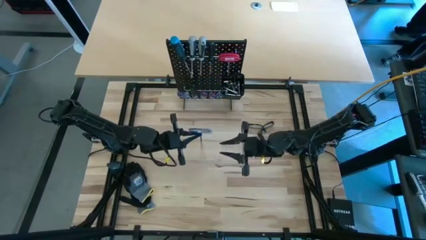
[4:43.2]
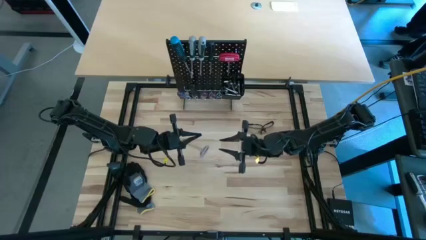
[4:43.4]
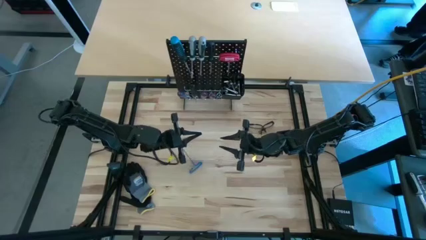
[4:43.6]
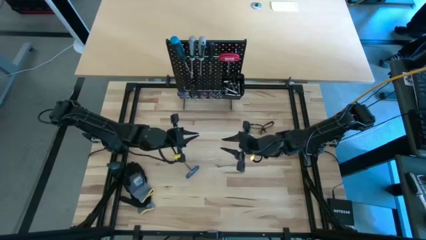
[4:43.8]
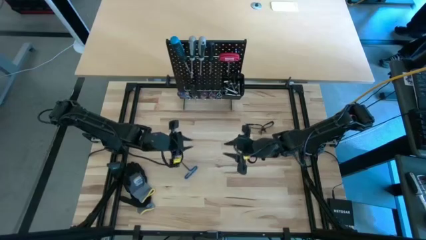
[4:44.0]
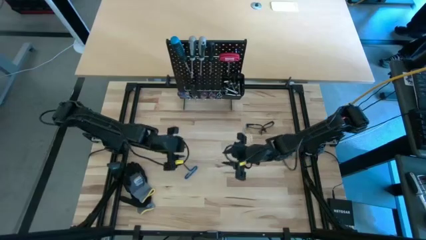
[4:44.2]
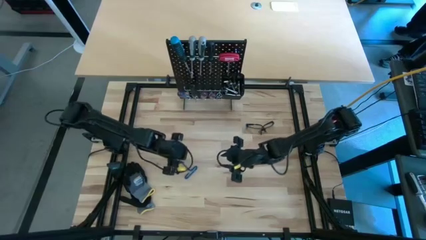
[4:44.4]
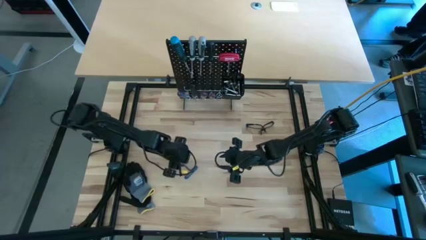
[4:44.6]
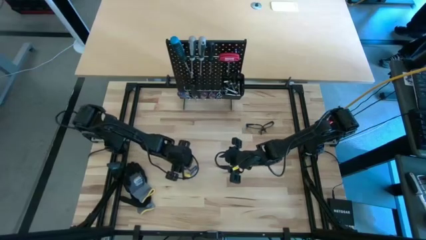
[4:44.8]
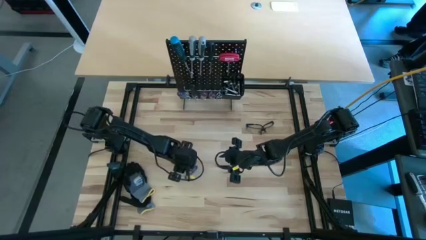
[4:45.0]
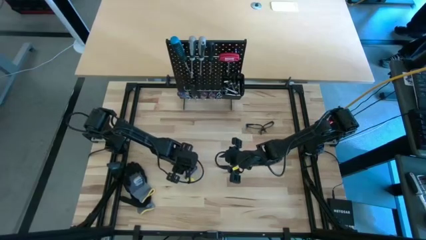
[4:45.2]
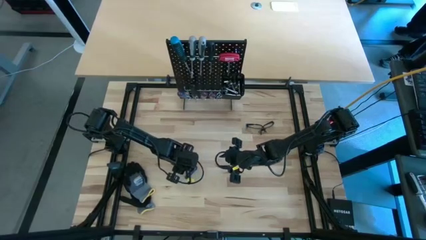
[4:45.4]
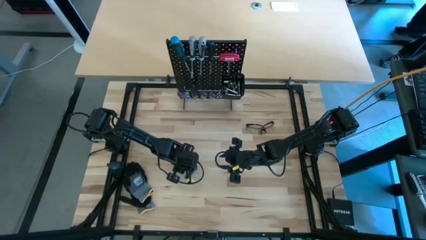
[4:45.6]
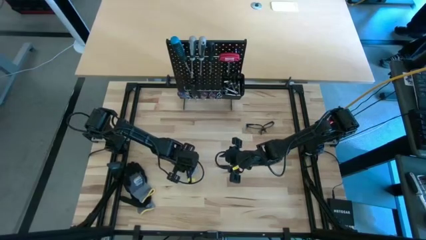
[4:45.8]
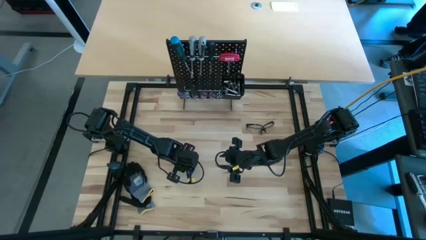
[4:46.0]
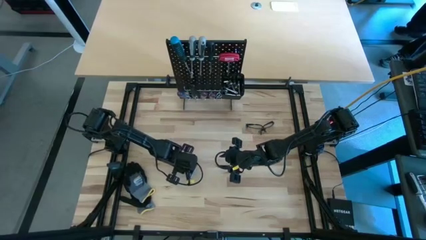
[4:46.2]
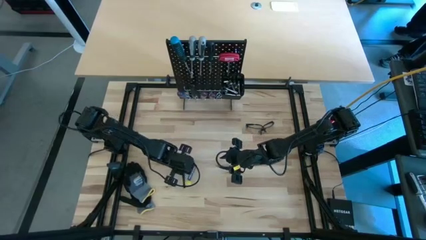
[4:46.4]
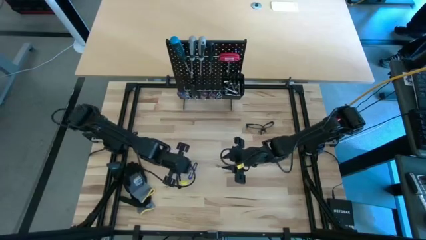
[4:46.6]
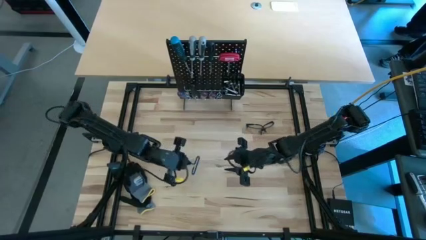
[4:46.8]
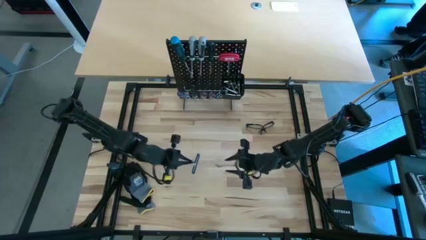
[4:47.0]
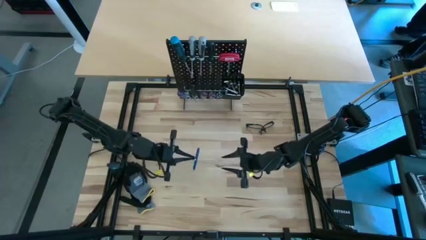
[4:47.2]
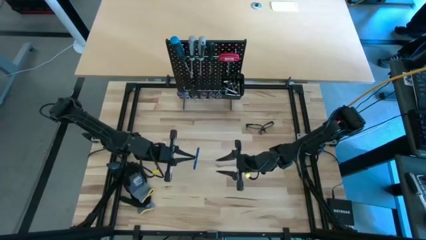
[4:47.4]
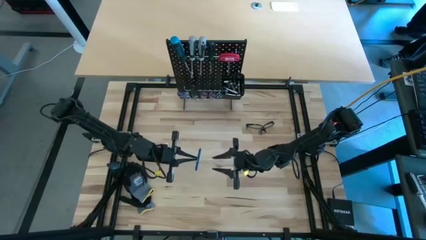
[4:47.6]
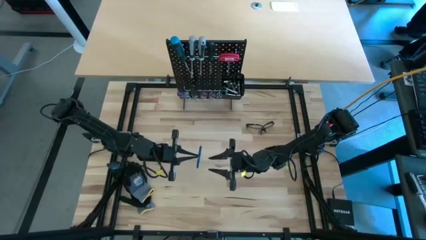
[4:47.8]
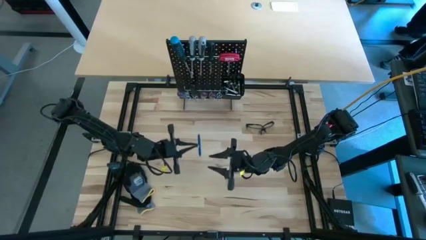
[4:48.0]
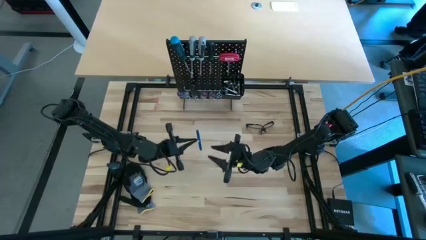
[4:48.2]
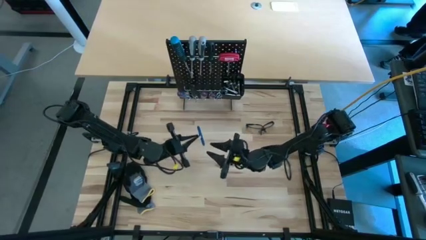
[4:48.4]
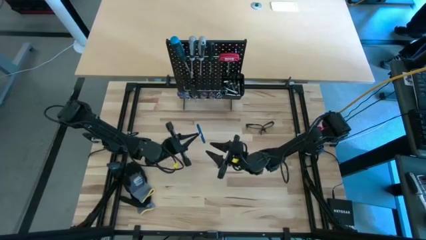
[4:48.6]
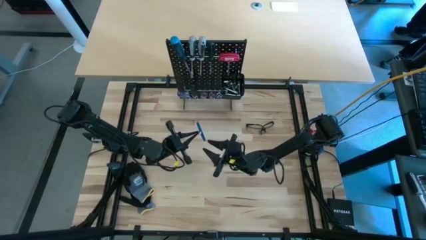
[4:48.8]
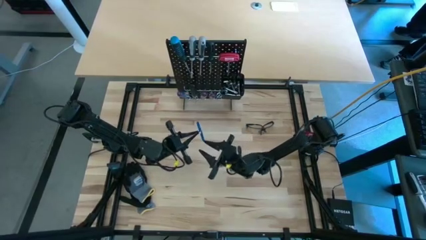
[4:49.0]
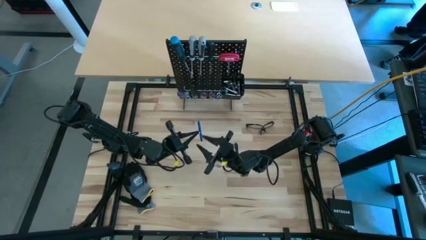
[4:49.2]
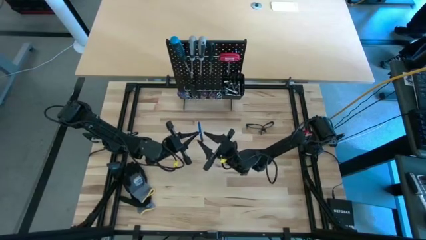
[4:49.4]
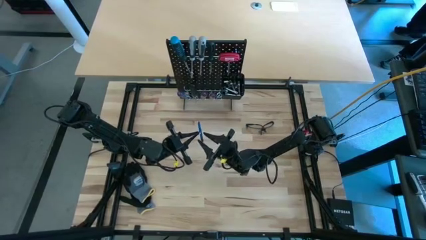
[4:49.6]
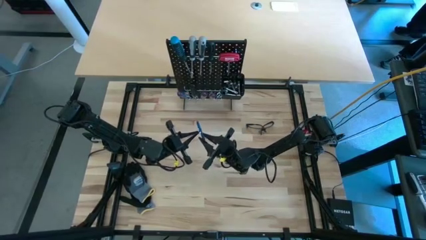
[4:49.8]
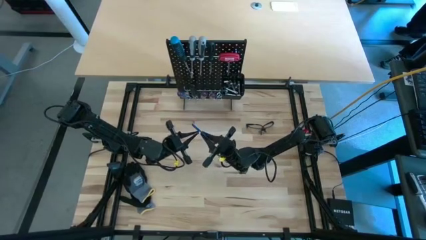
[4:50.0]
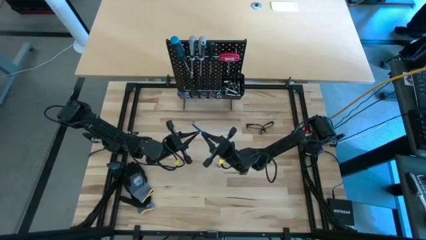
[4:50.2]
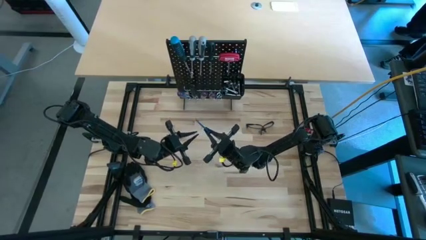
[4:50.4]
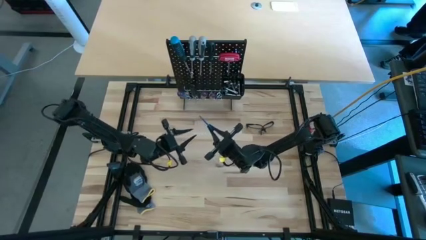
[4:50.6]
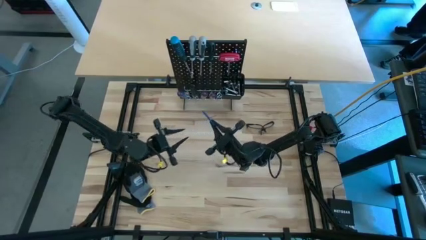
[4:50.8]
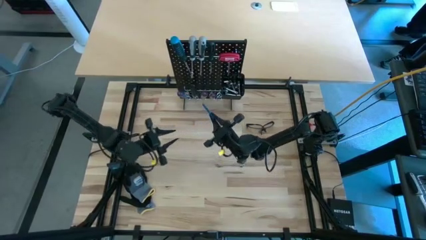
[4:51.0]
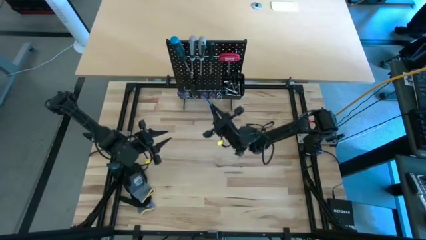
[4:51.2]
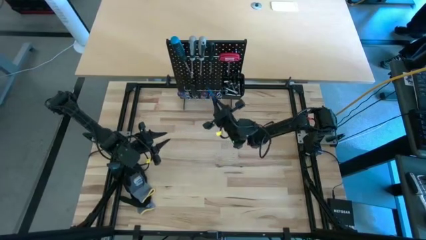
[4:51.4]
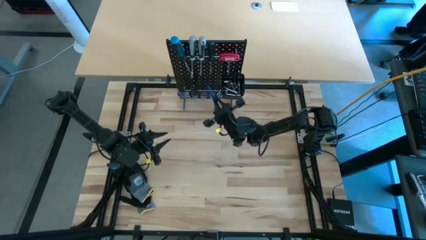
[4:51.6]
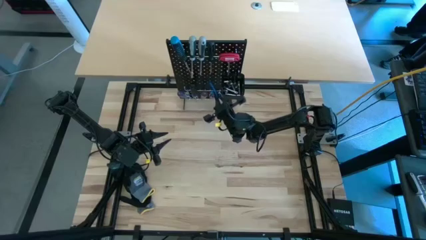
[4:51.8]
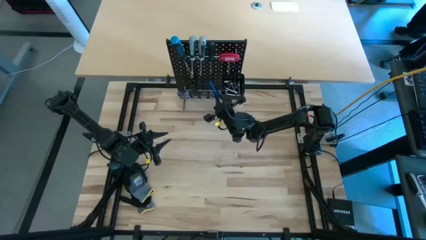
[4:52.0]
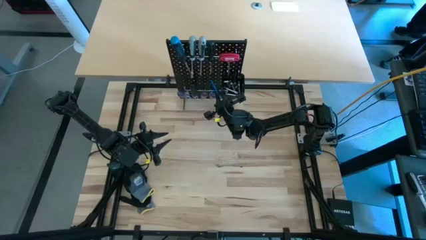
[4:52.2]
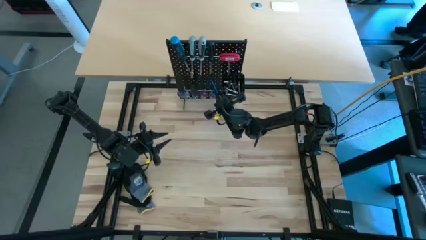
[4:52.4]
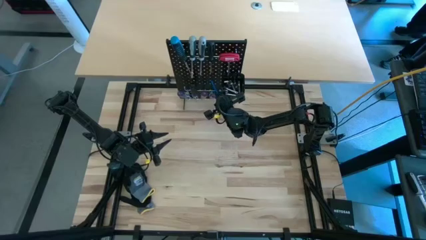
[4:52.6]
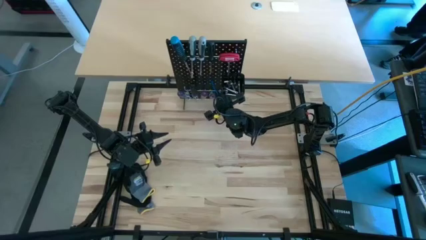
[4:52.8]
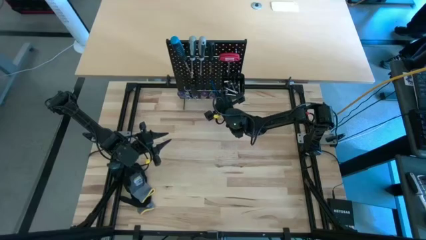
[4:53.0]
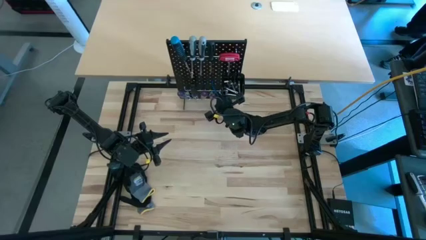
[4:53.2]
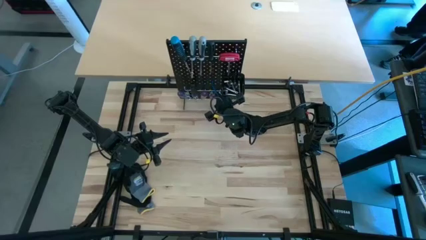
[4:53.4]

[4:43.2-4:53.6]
Task: Hang tools onto peg board
Hang the blue pick tool on the peg board

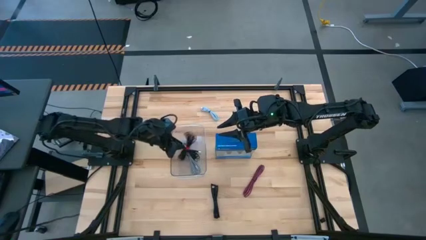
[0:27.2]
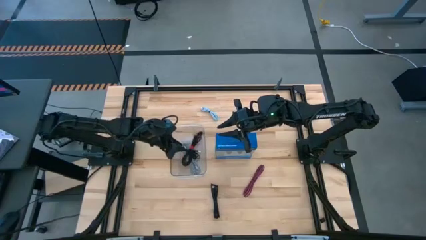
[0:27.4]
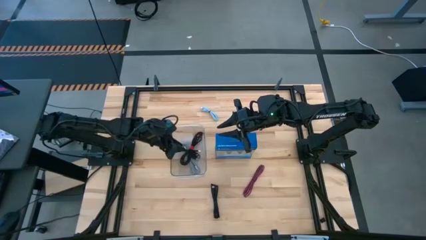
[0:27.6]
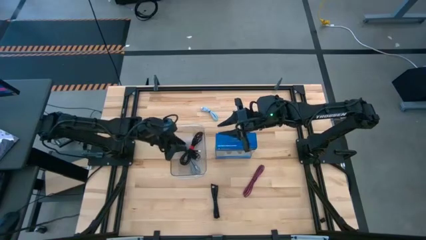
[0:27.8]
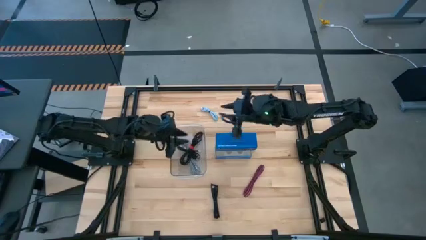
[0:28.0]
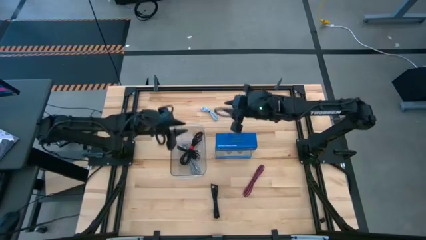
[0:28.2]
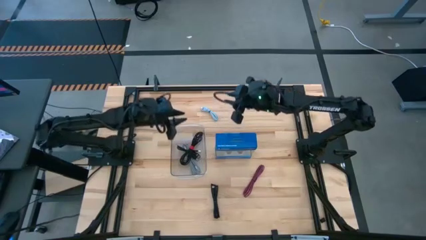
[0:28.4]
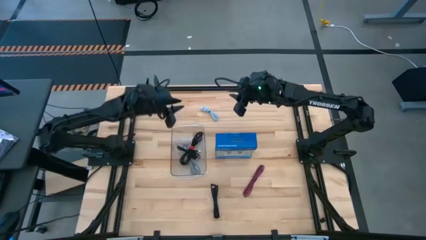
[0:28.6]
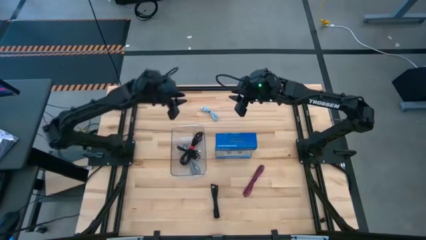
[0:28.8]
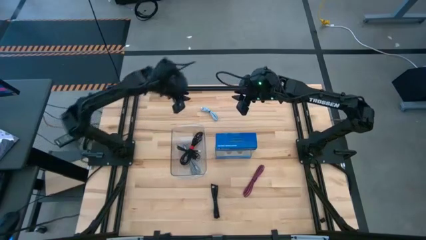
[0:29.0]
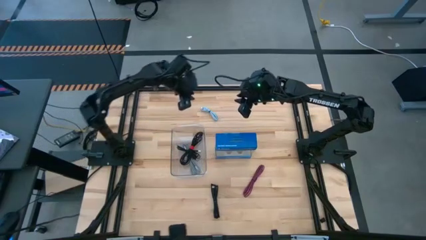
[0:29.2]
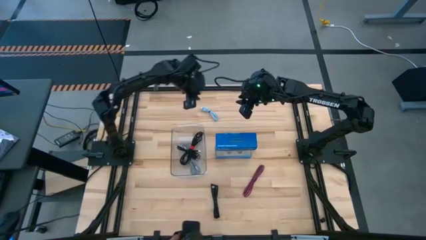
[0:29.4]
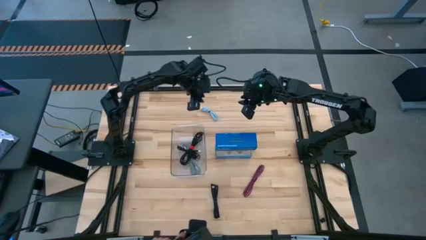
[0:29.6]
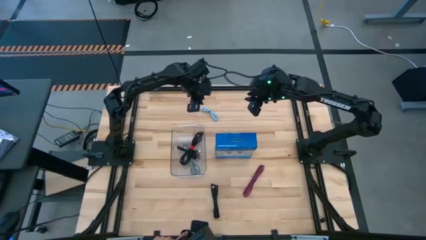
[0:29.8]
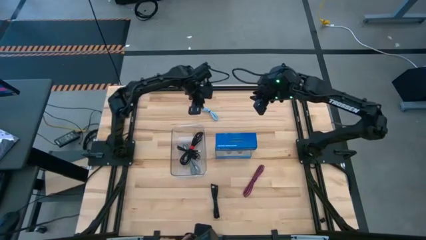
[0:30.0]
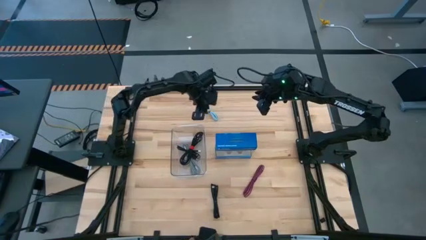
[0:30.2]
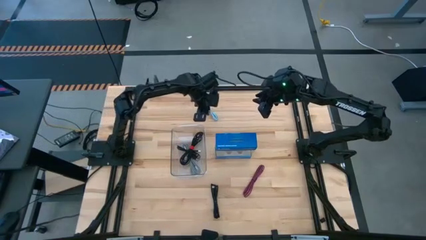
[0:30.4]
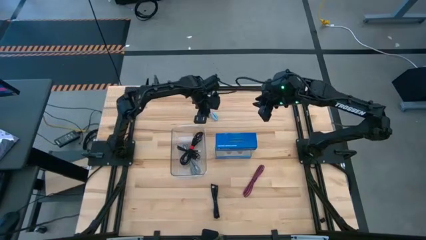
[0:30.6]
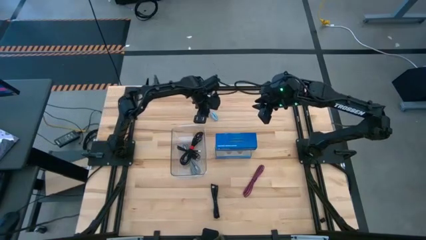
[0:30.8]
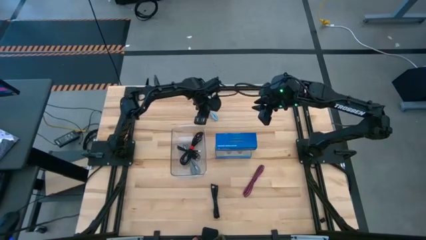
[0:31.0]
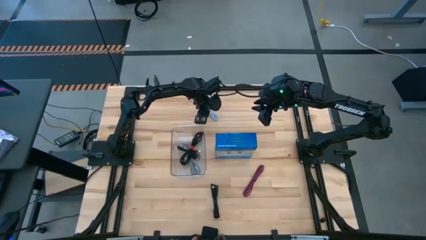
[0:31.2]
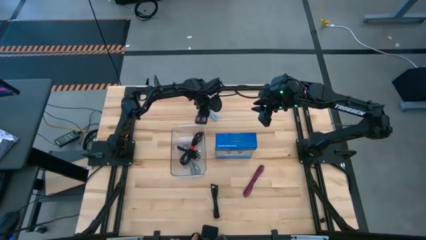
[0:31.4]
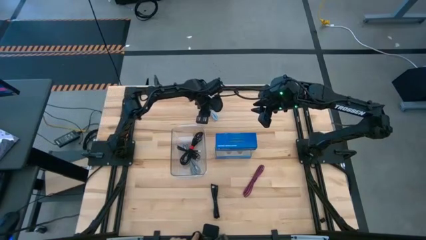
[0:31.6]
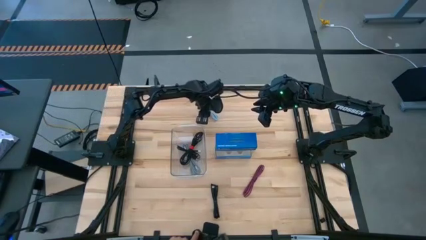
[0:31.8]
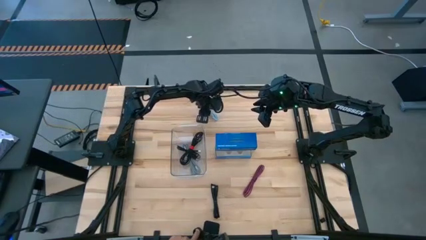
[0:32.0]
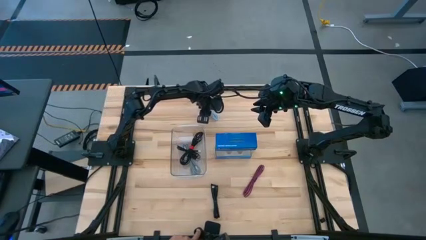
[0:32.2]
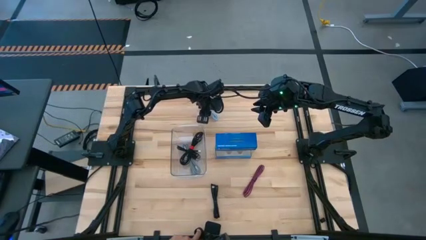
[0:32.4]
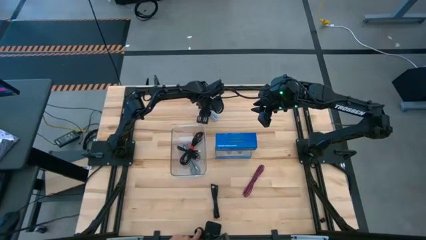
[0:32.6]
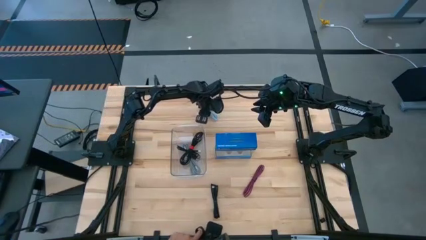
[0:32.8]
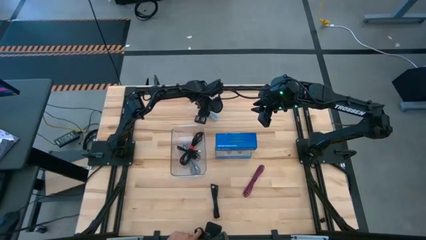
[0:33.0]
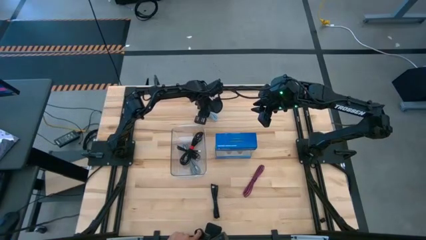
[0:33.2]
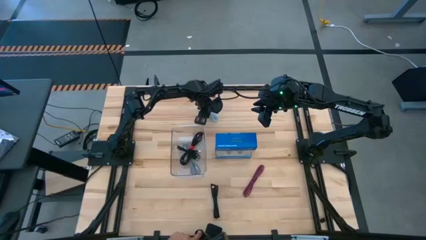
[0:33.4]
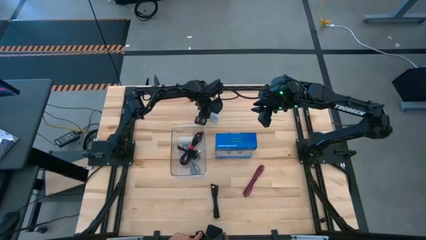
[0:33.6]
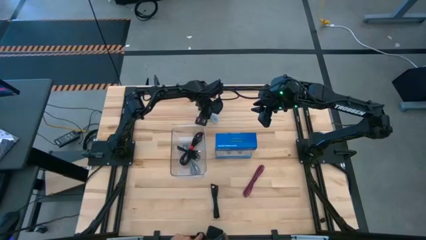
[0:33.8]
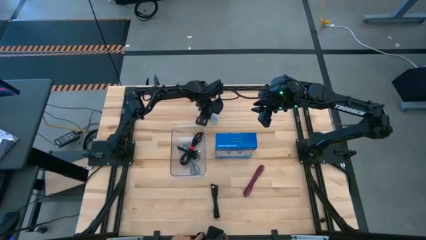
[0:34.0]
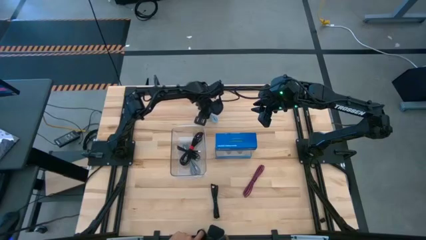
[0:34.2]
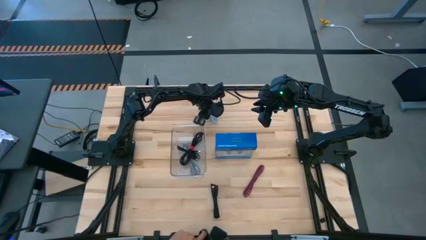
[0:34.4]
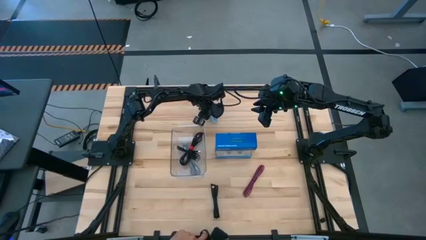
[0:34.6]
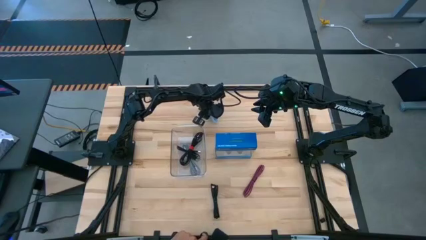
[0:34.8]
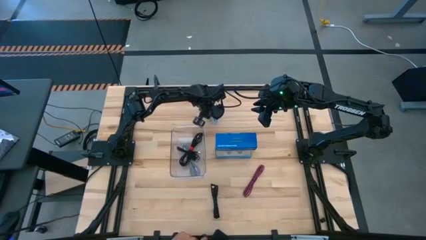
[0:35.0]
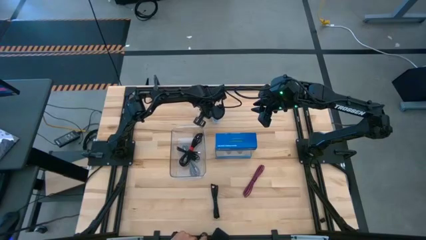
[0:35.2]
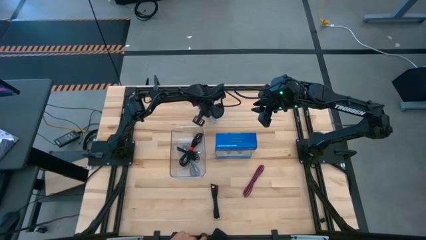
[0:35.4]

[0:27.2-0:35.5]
Task: Pick and place USB-C Cables
Put the light blue charger cable into the transparent bin
